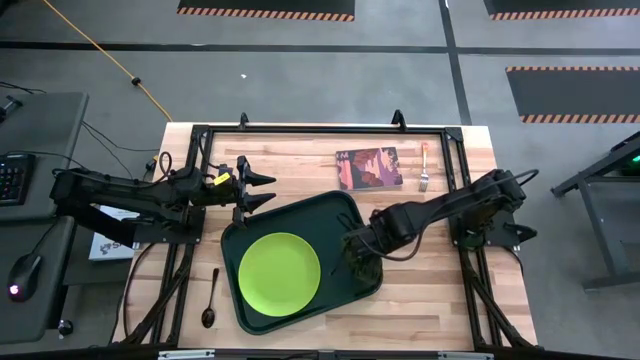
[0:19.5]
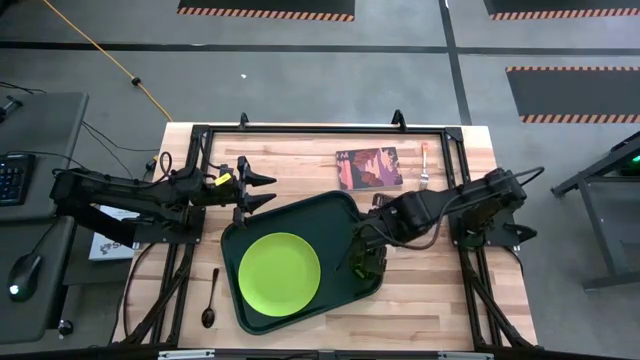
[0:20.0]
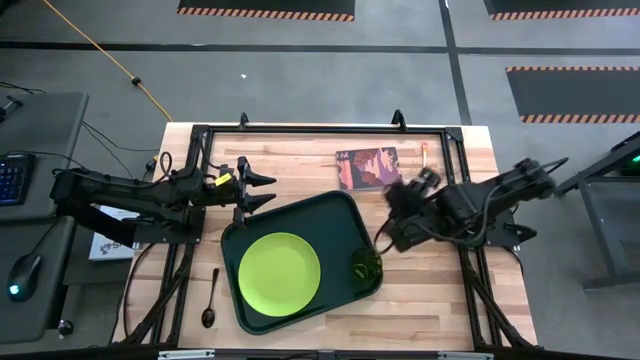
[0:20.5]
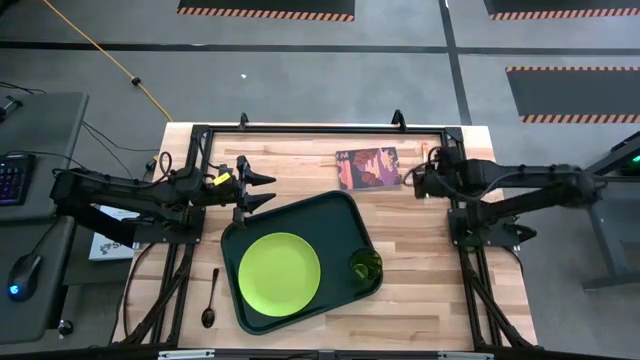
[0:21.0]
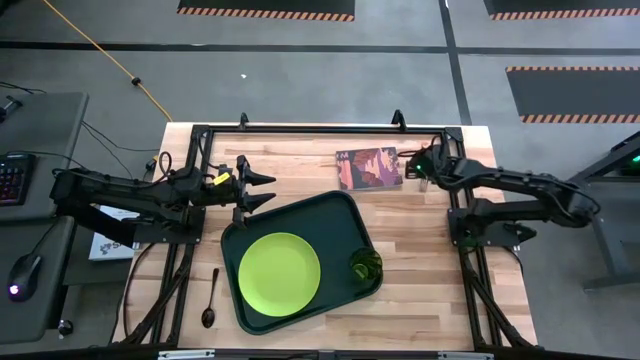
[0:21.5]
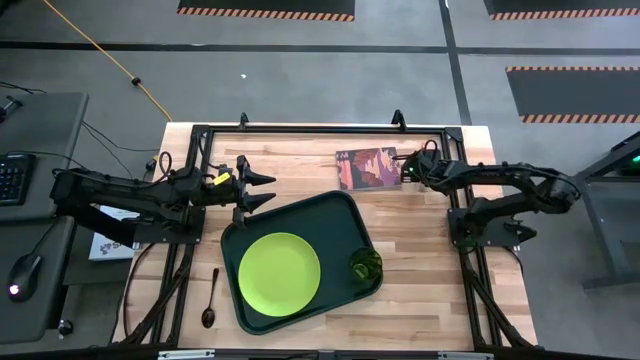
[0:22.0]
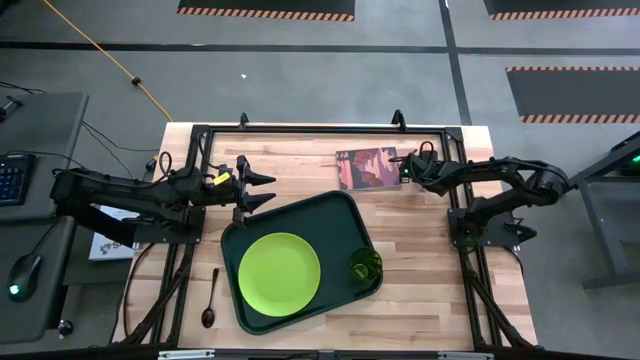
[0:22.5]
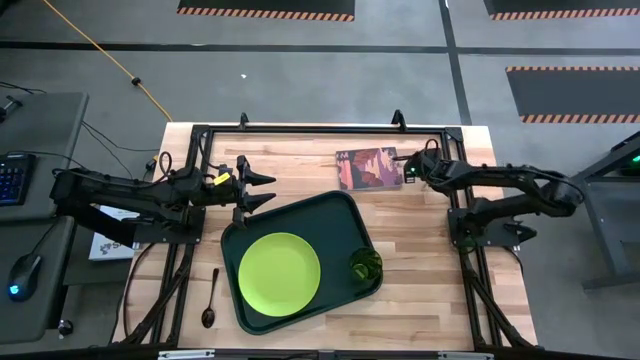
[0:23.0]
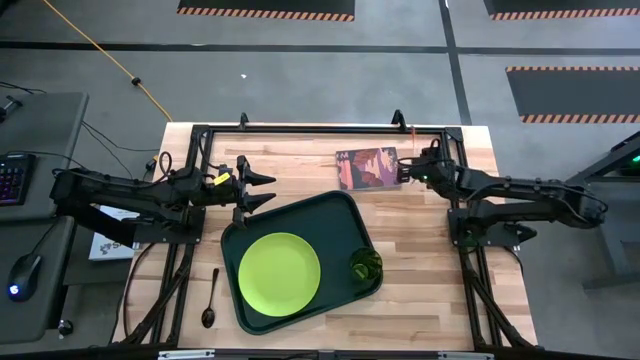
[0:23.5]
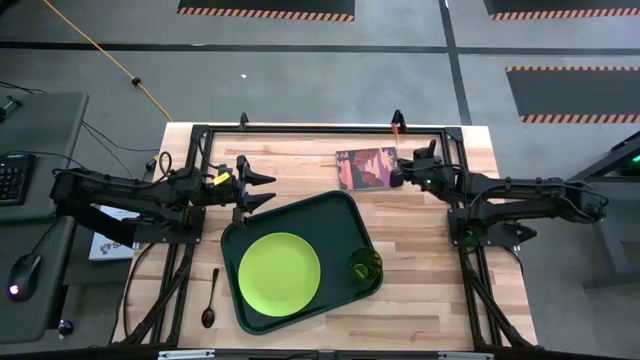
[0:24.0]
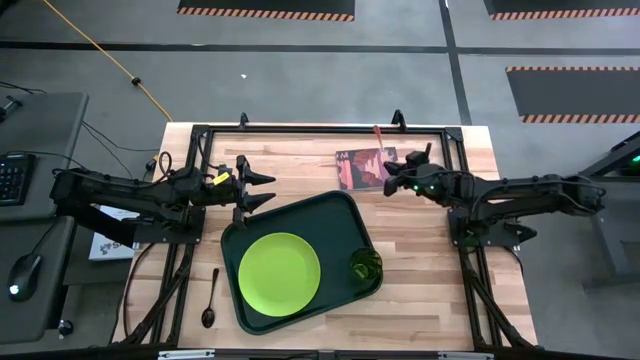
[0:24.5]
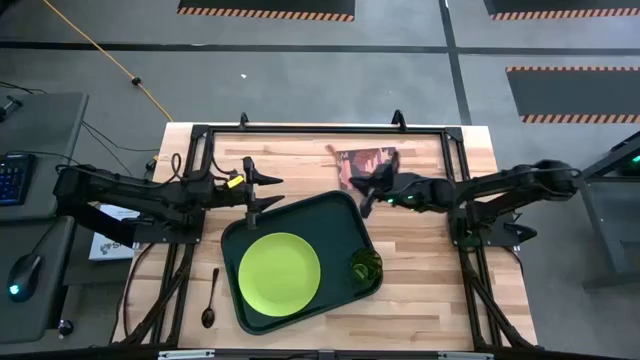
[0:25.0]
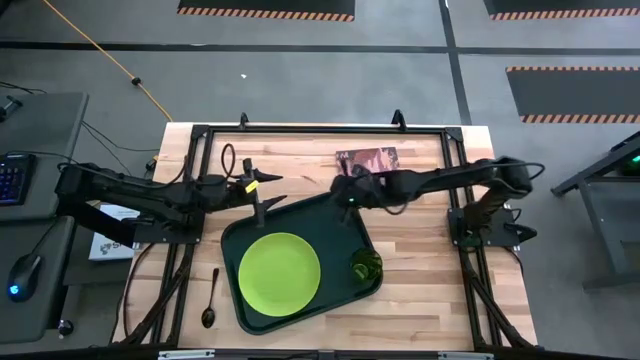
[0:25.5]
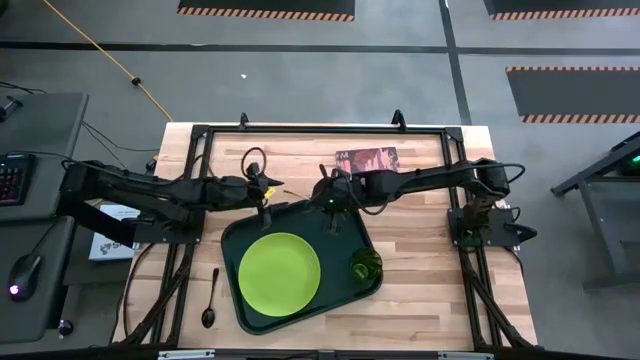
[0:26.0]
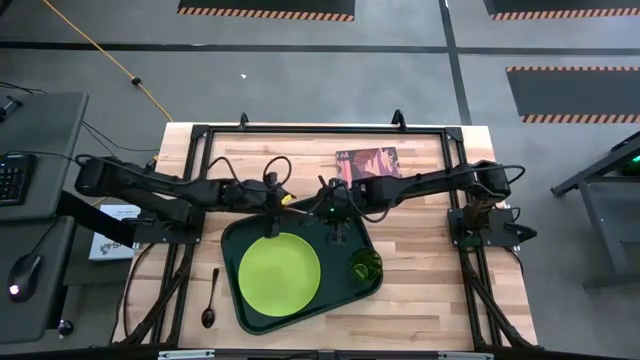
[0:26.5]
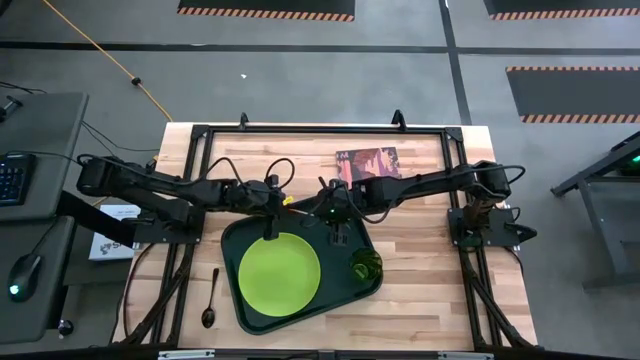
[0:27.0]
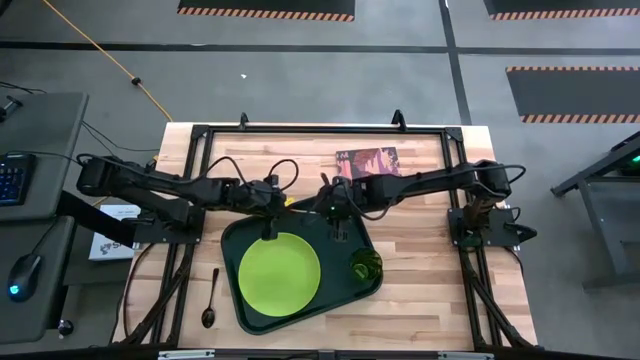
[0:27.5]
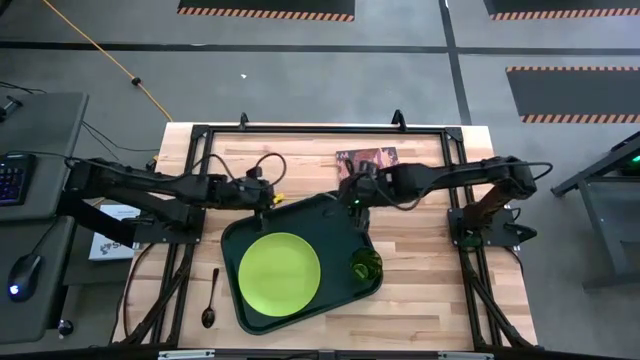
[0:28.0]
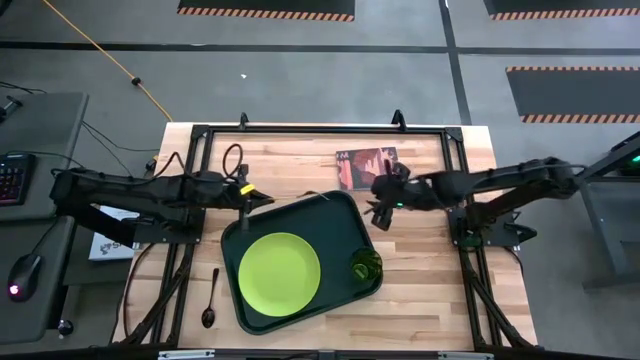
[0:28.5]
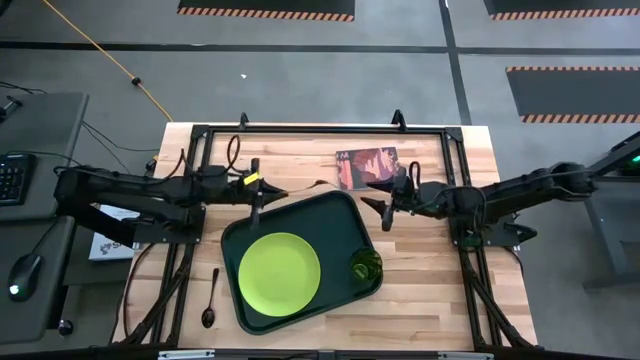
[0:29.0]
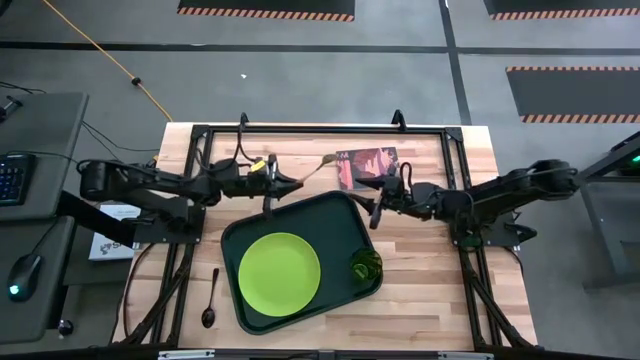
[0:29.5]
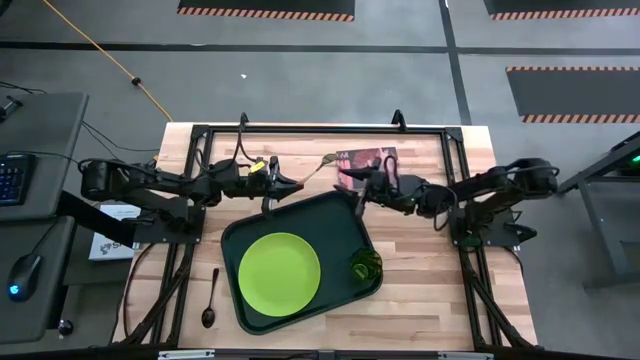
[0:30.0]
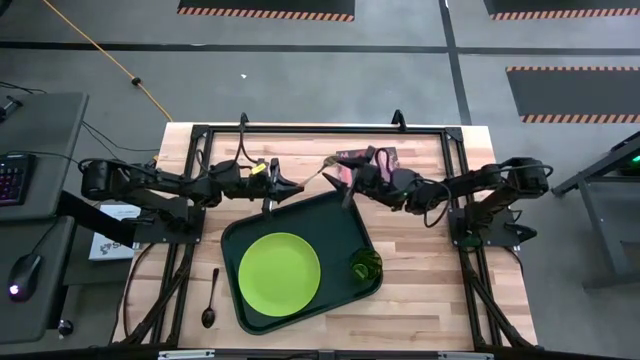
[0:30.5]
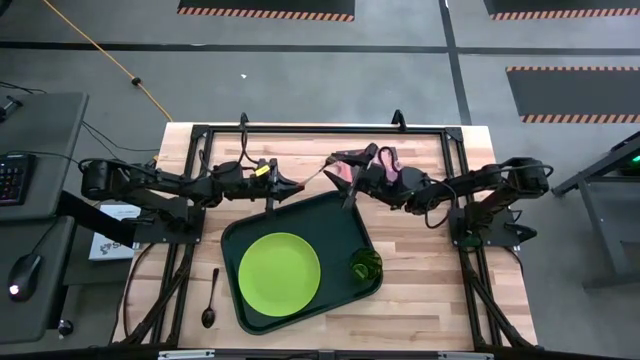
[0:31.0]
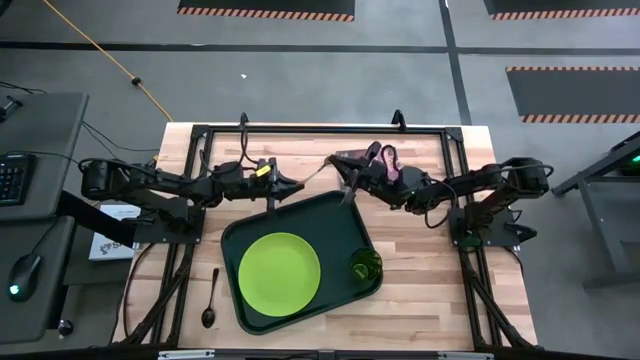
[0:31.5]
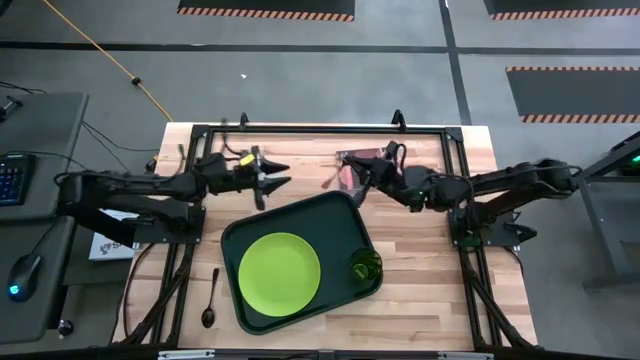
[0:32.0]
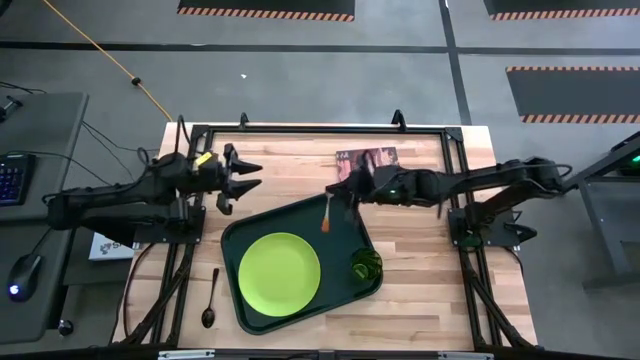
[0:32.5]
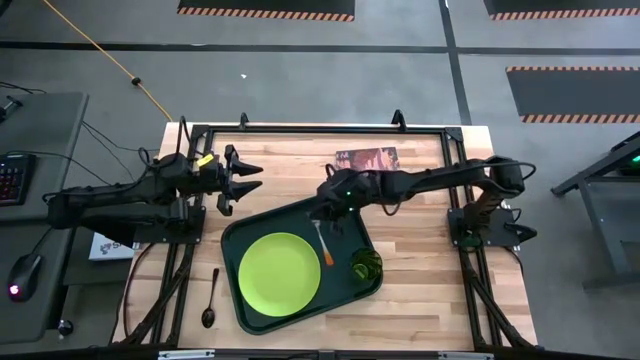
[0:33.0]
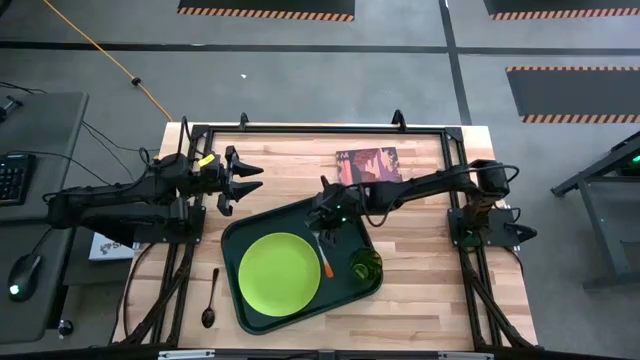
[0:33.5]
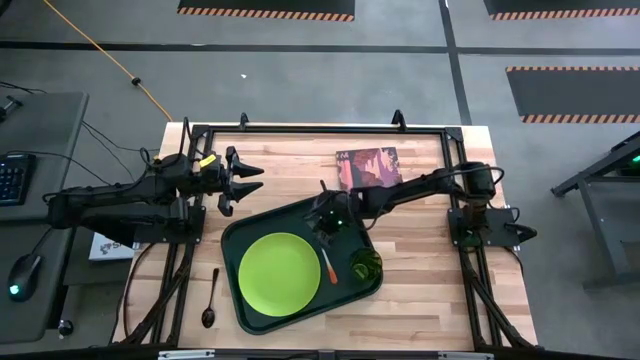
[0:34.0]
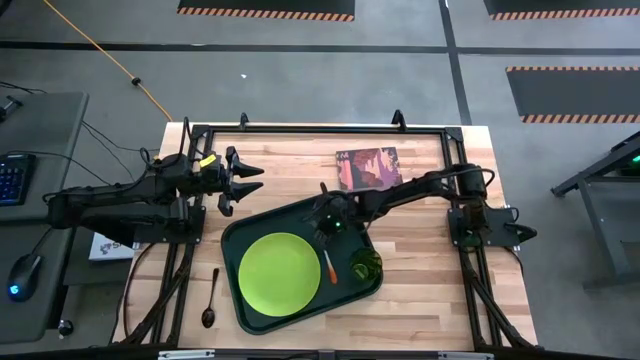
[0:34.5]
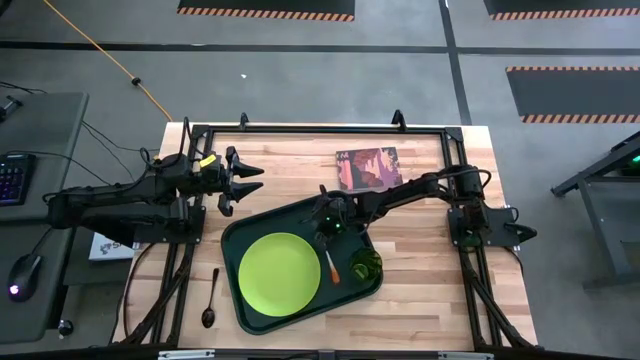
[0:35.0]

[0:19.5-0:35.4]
Task: Pick and place plate/cup/fork/spoon on tray
Put the orange fork on the black tray to the right of the green plate

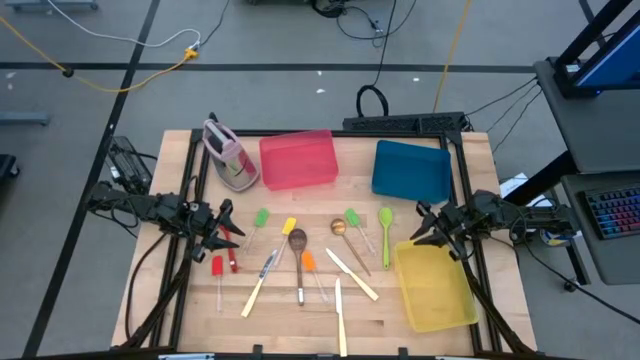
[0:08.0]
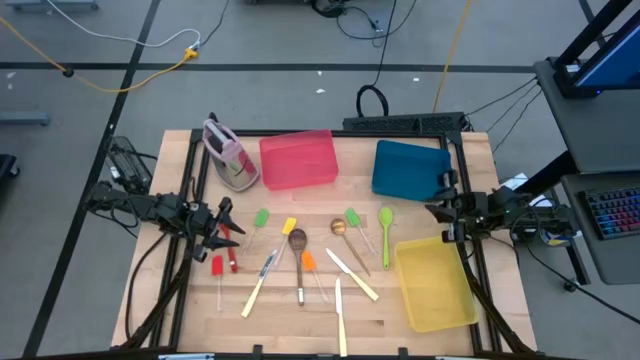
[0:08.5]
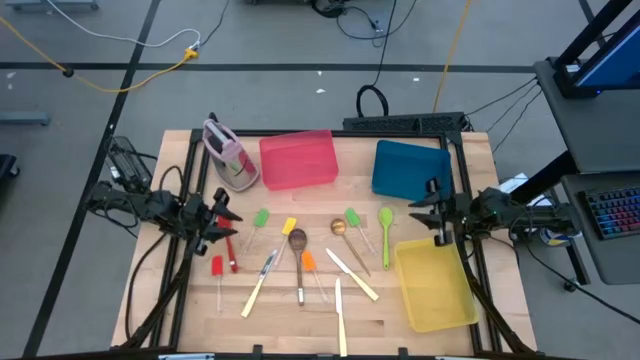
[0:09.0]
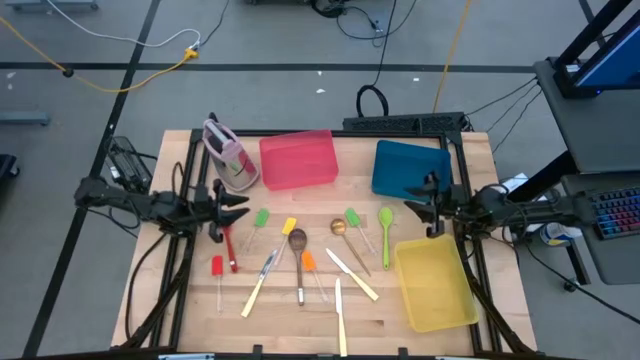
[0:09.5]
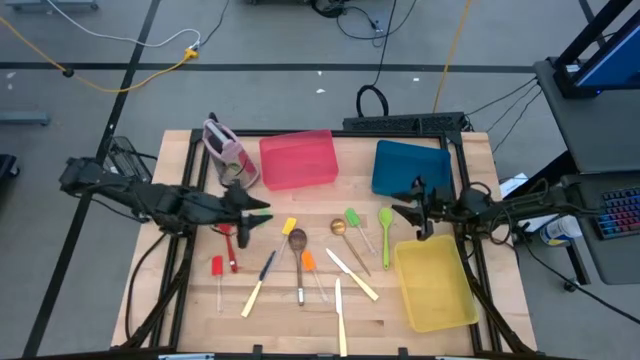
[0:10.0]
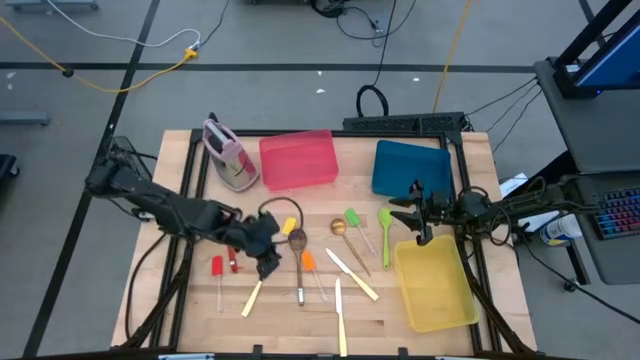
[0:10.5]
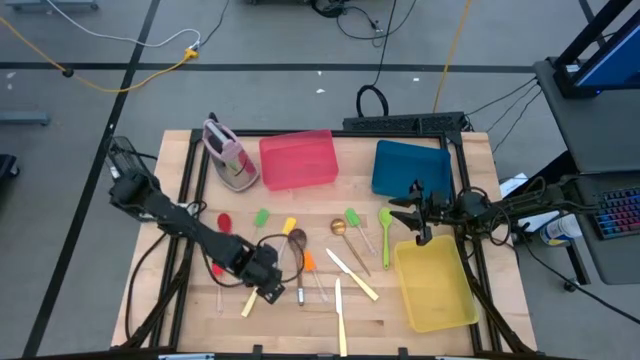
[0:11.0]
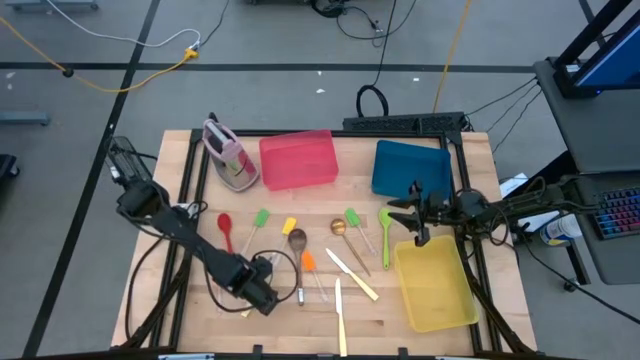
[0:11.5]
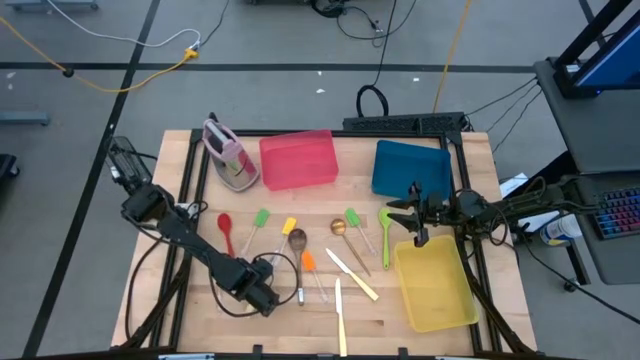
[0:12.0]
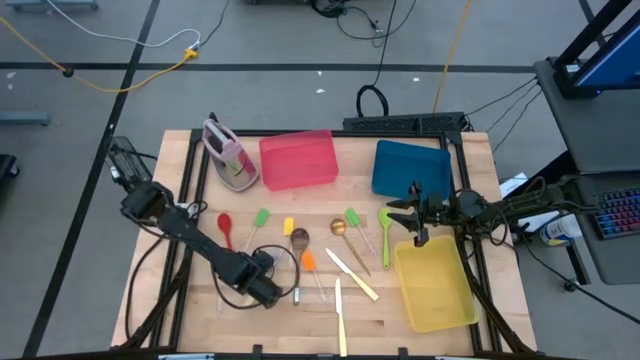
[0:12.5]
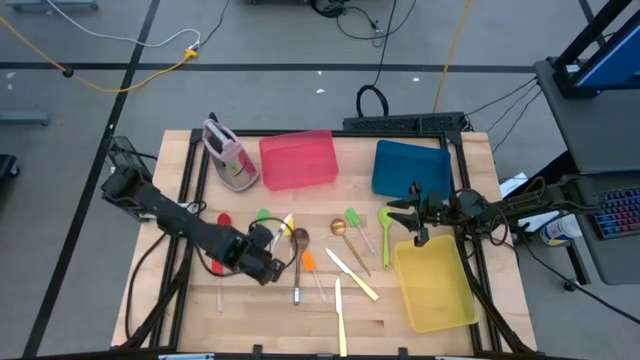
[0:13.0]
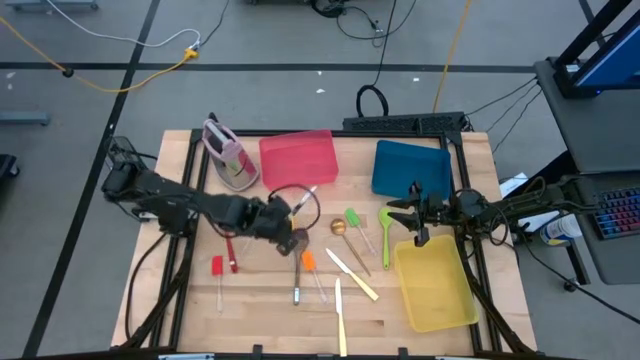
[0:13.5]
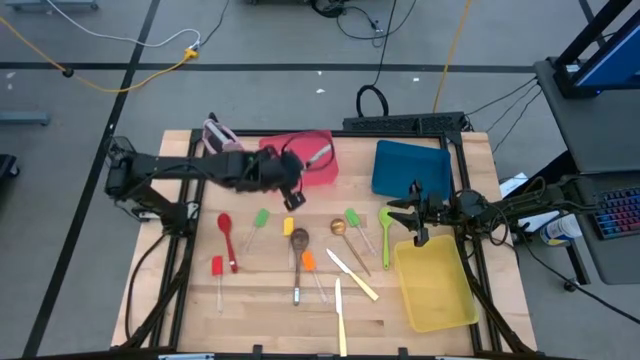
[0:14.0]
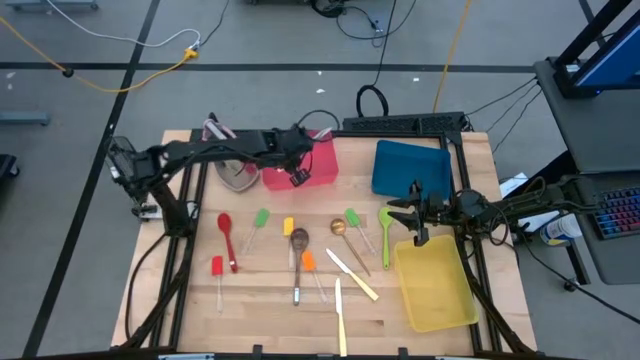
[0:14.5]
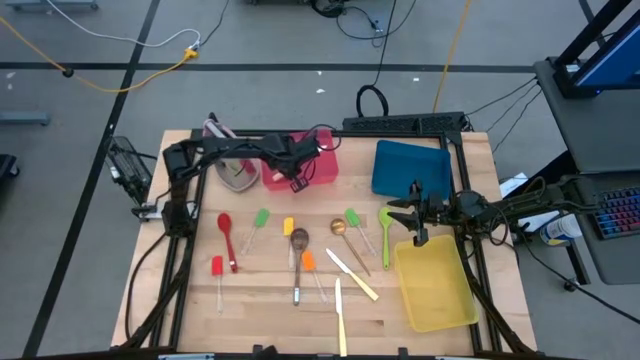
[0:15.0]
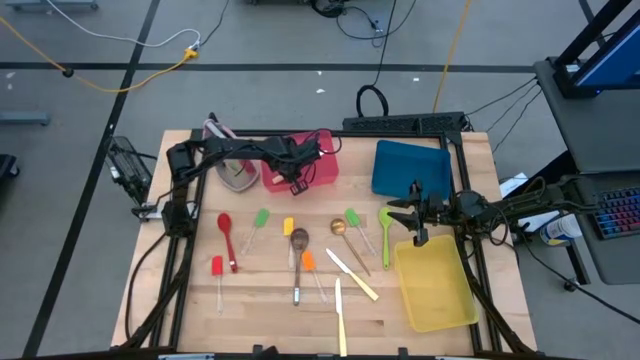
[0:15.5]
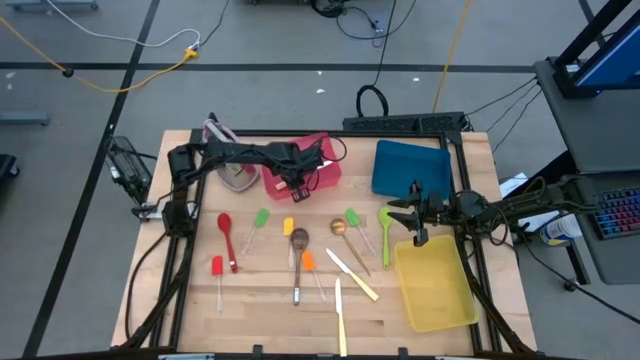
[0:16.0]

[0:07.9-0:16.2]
Task: Pick & Place Kitchen Items
Put the yellow knife into the pink bin
